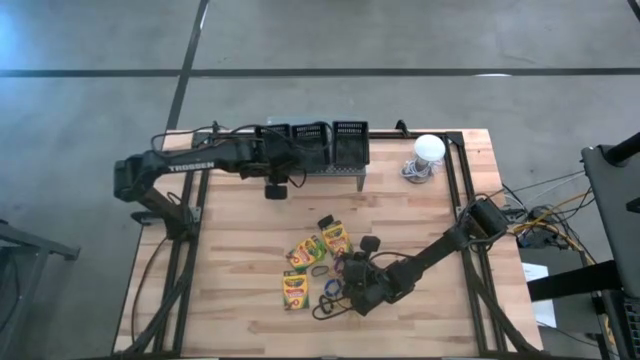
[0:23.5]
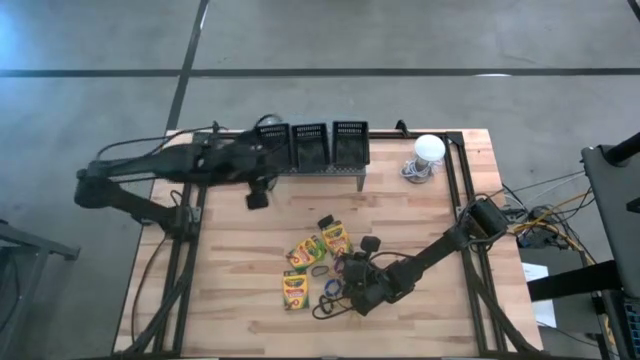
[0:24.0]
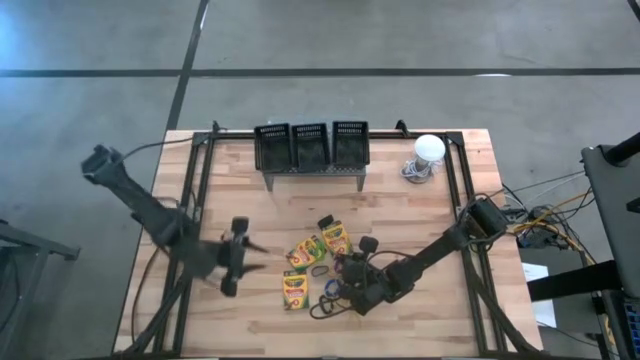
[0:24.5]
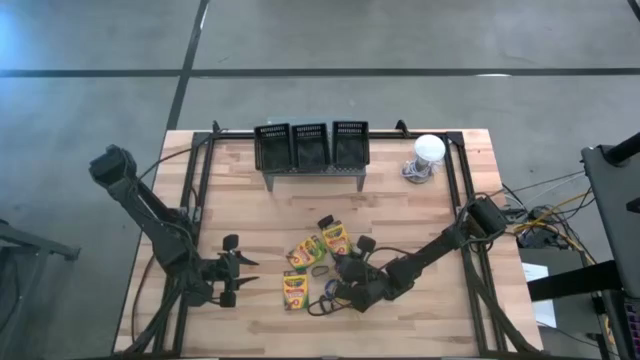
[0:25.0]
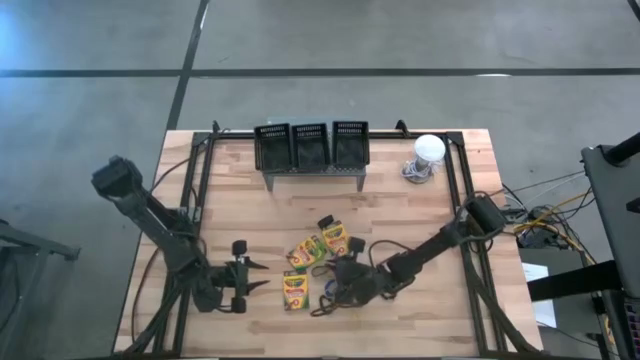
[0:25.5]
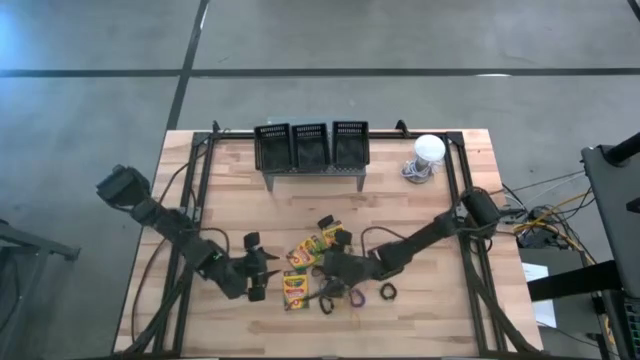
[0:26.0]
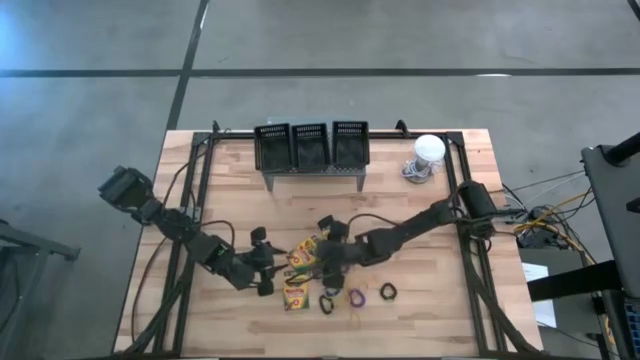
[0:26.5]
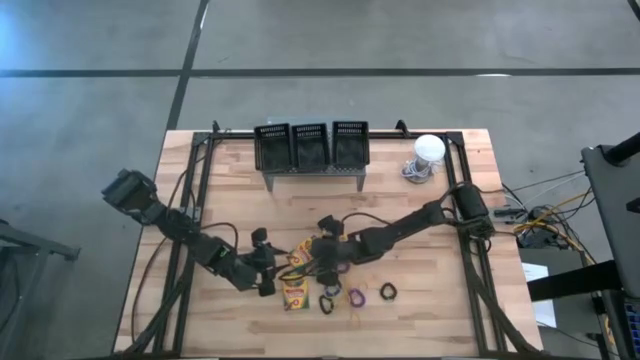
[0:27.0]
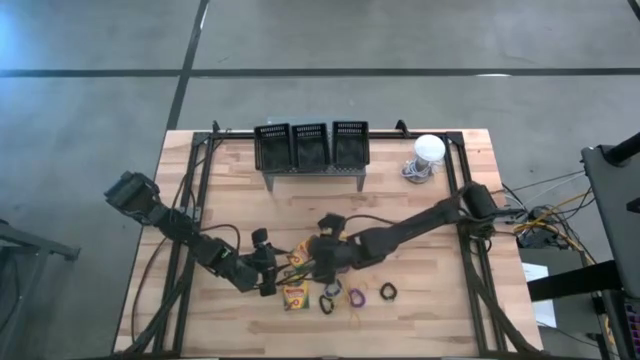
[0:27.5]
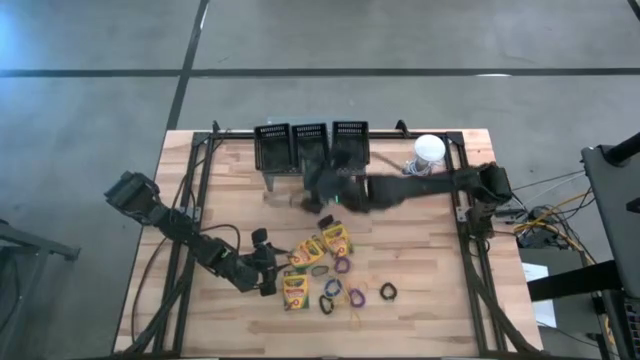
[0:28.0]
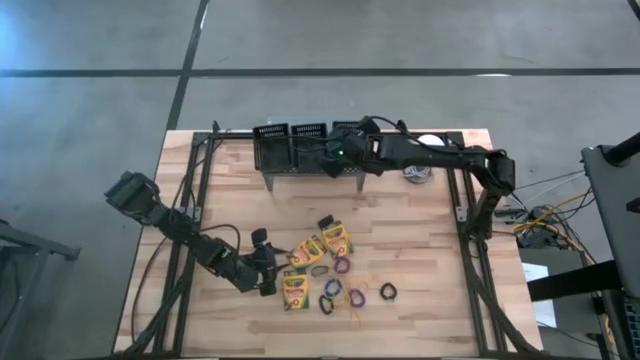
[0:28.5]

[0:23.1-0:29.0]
Task: Pick & Place Office Desk Supplies
Put the green spring key chain into the right black bin

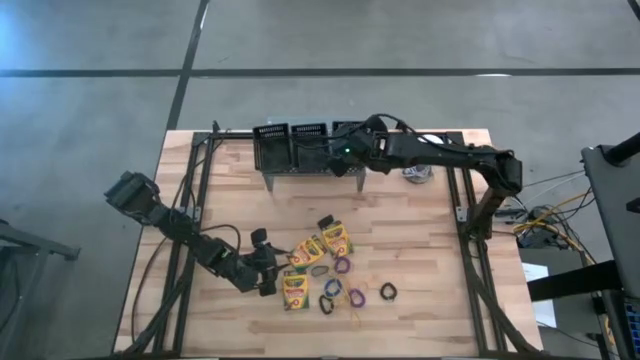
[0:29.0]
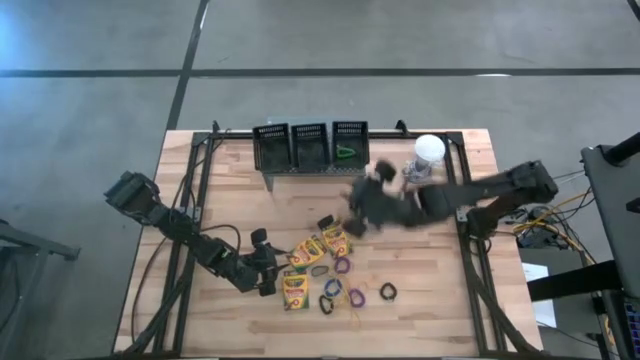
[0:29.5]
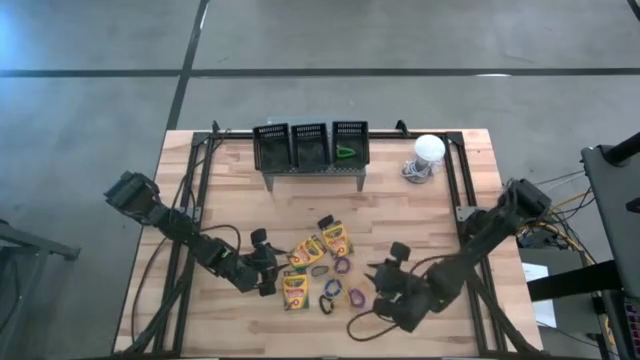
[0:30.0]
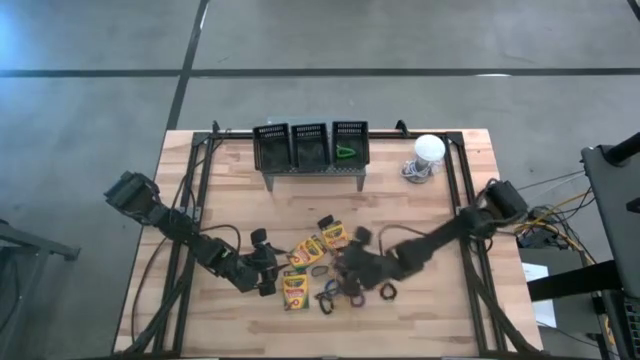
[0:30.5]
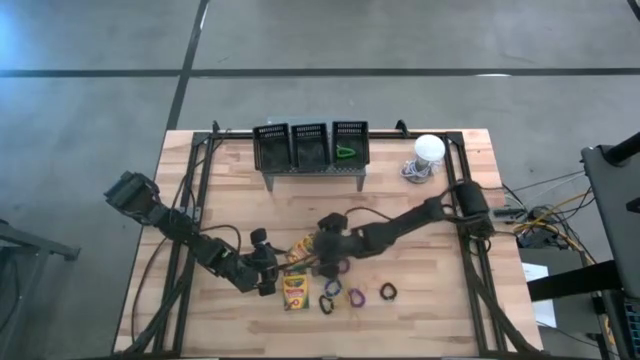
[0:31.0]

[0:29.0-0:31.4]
Put the yellow rubber band into the middle black bin

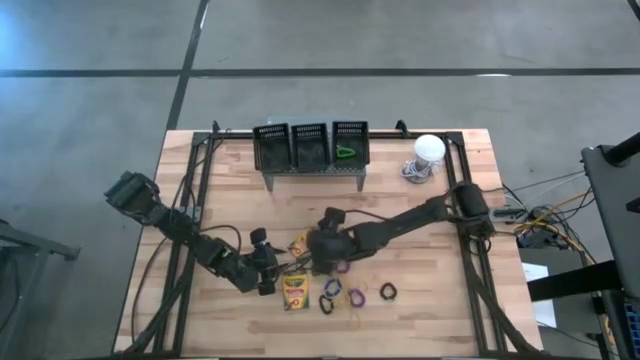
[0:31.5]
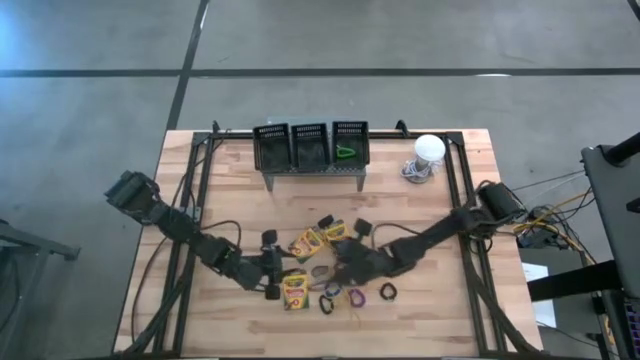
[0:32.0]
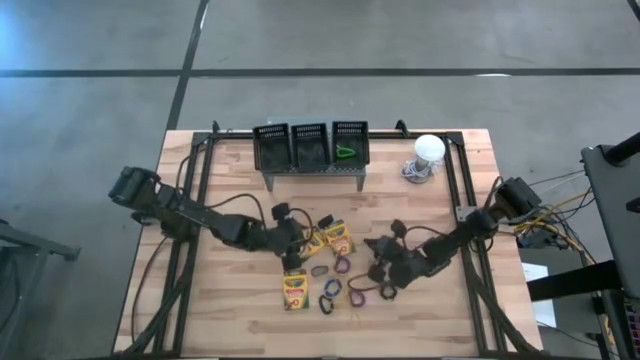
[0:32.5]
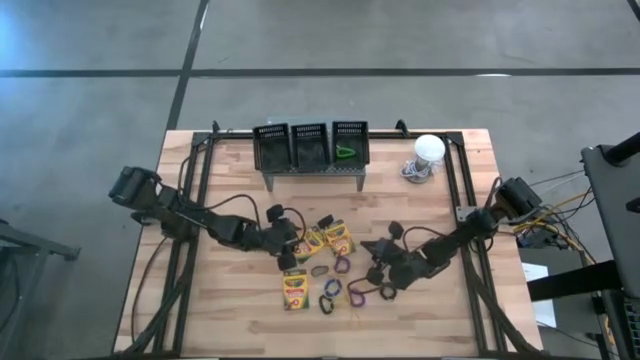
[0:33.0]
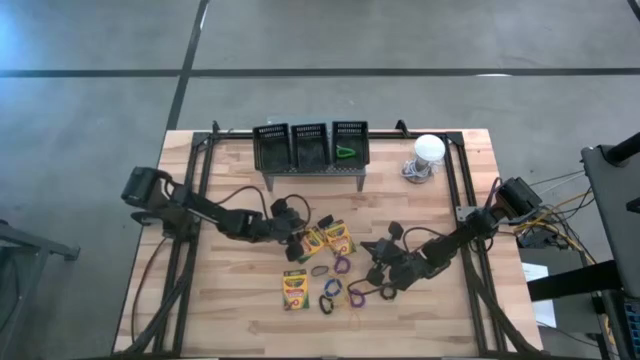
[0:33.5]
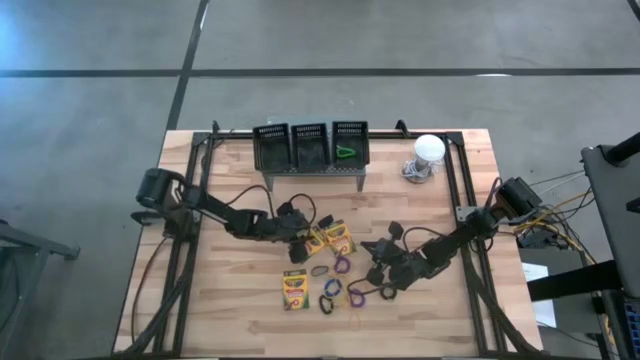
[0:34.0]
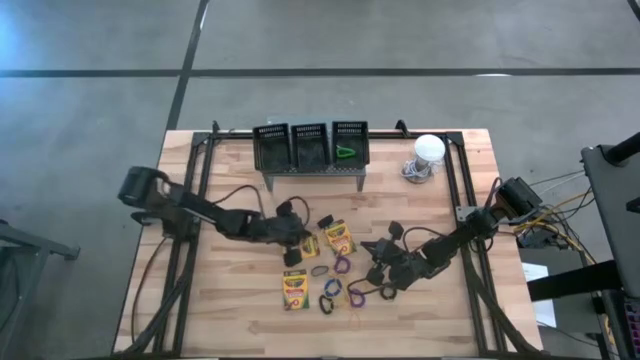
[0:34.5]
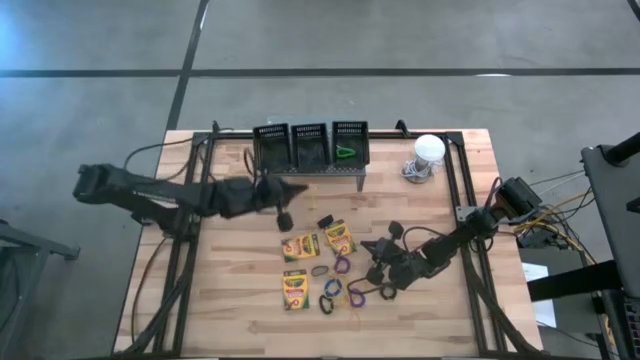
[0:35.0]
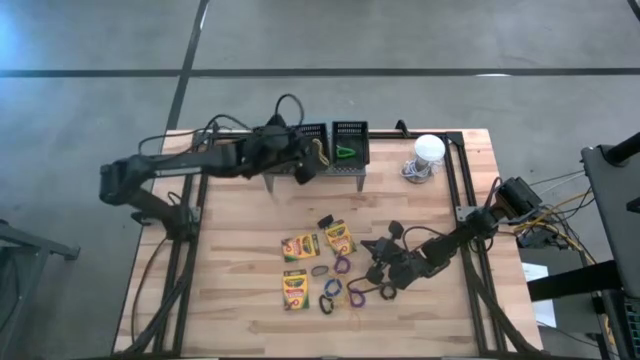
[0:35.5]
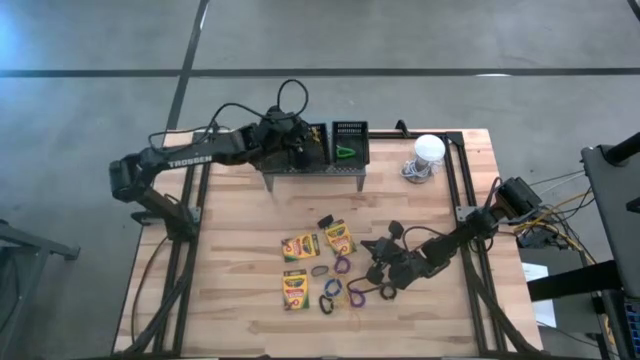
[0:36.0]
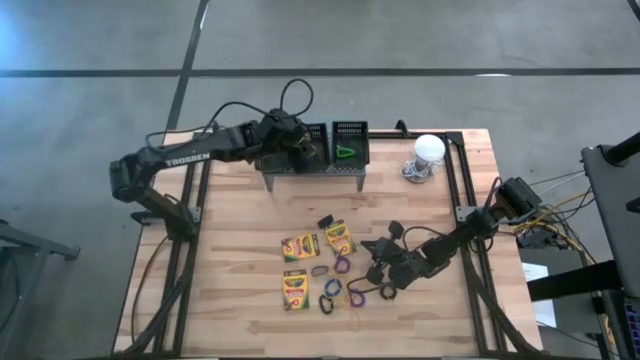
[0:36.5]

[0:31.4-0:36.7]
Put the yellow rubber band into the middle black bin

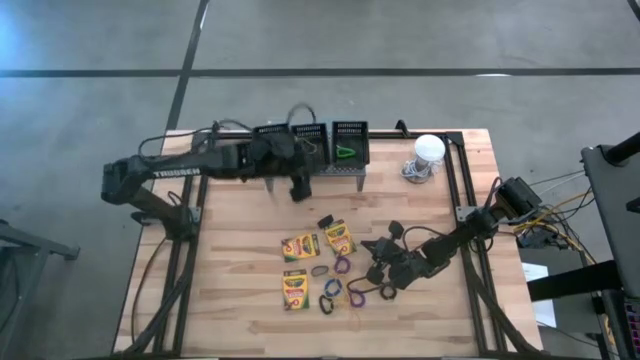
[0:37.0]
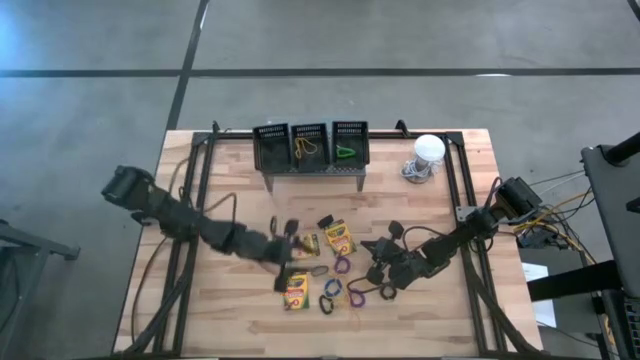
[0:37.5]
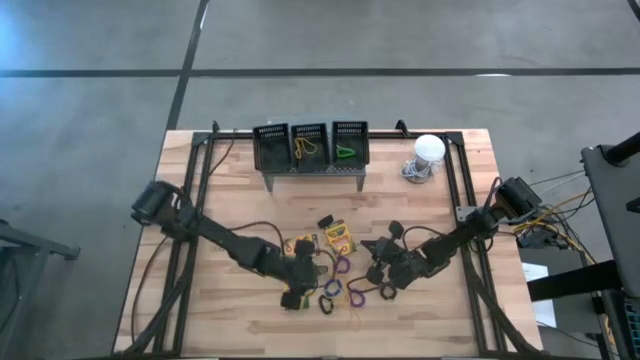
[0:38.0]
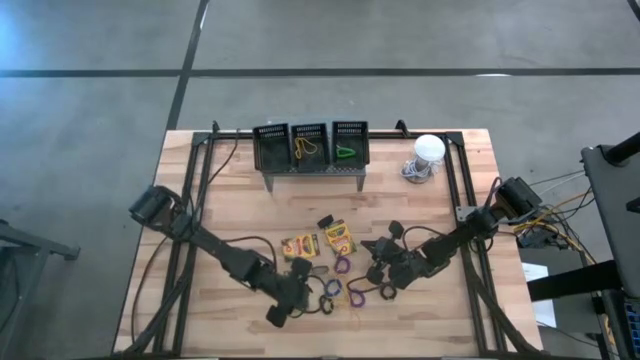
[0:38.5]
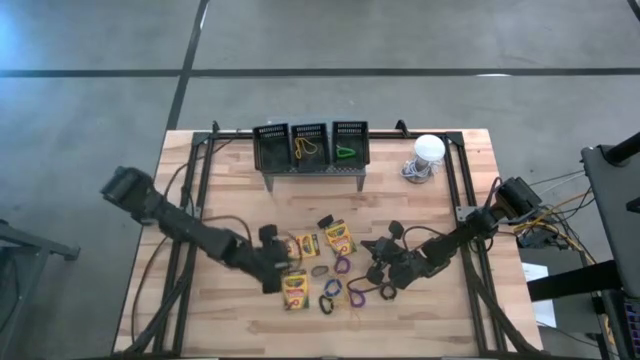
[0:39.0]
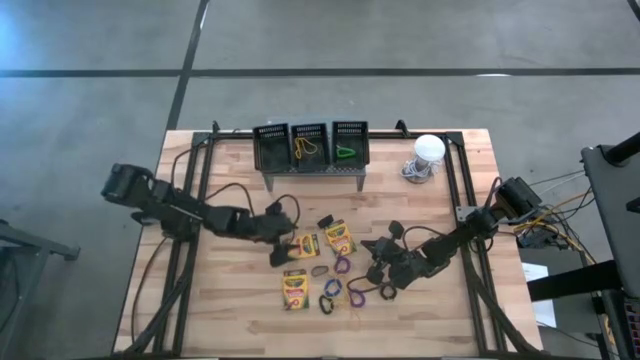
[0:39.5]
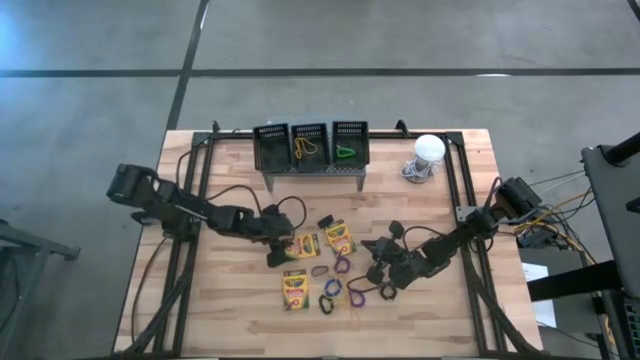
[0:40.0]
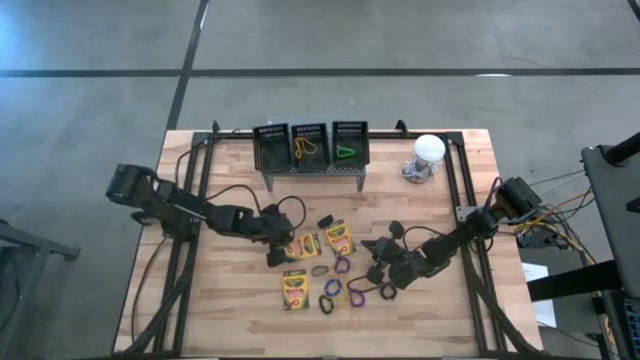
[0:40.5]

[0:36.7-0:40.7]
Put the top left crayon box into the left black bin

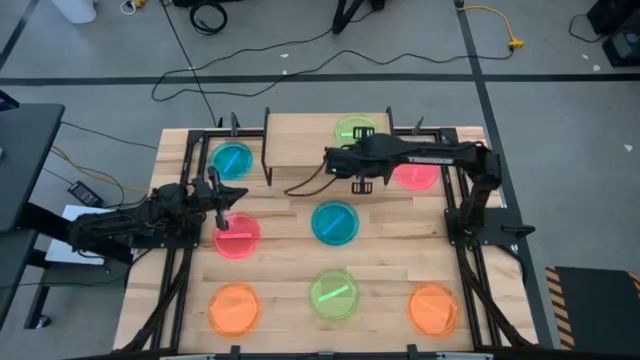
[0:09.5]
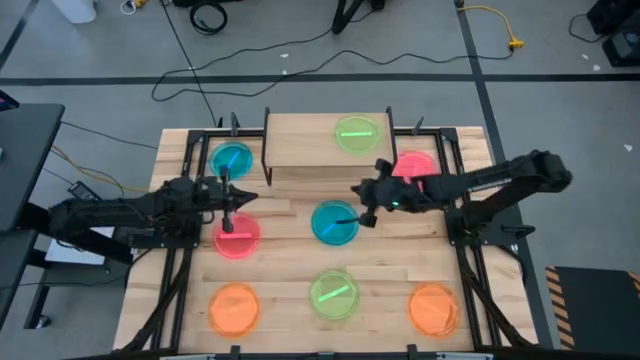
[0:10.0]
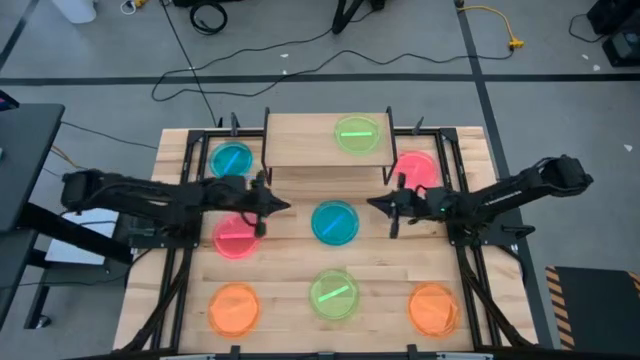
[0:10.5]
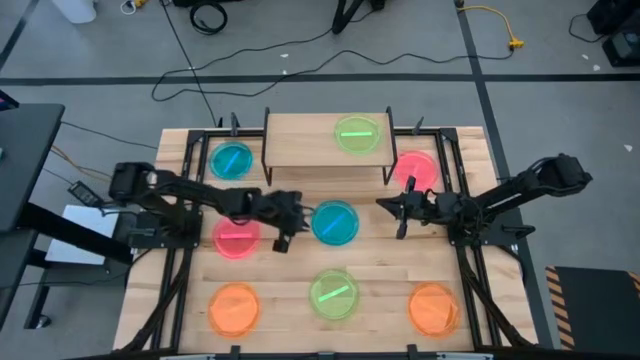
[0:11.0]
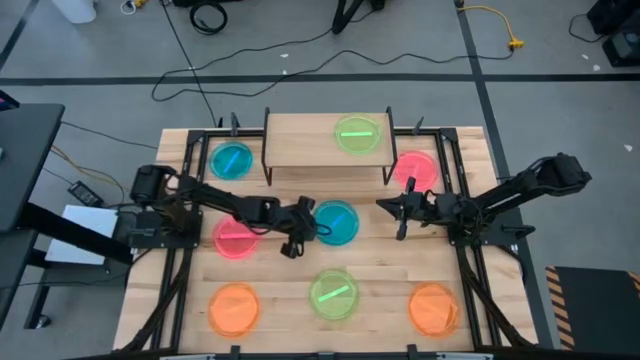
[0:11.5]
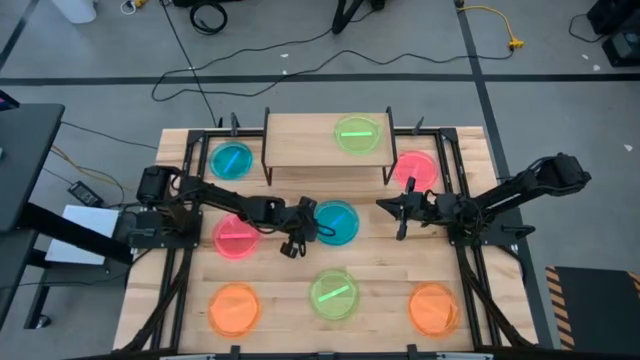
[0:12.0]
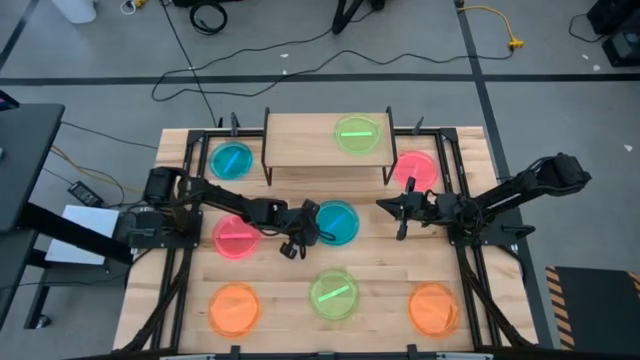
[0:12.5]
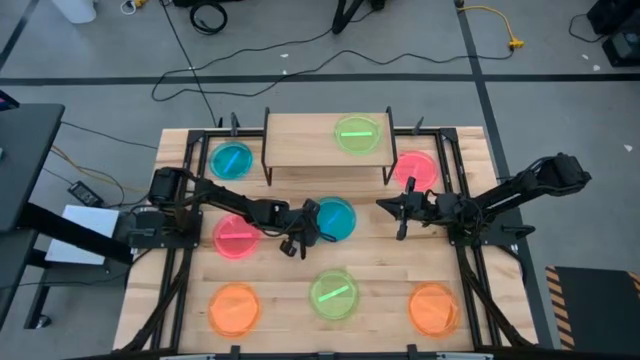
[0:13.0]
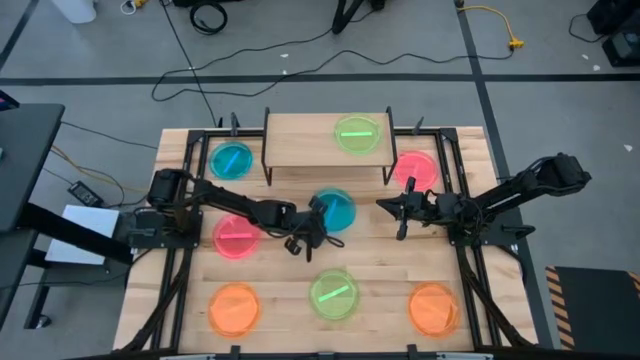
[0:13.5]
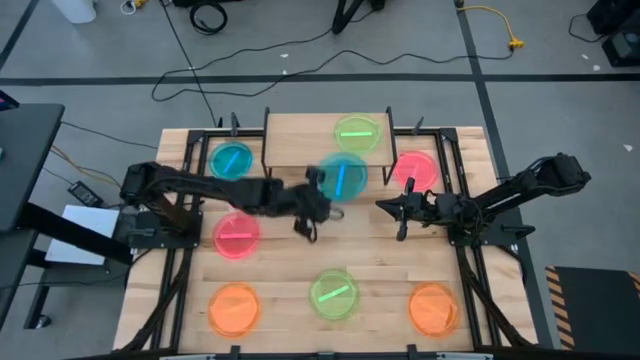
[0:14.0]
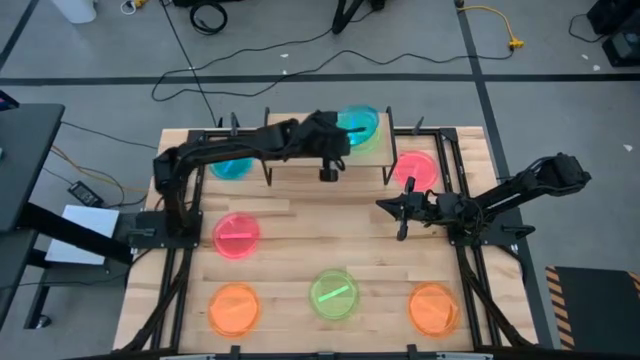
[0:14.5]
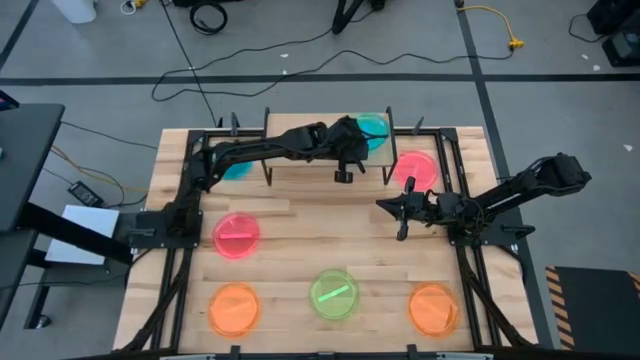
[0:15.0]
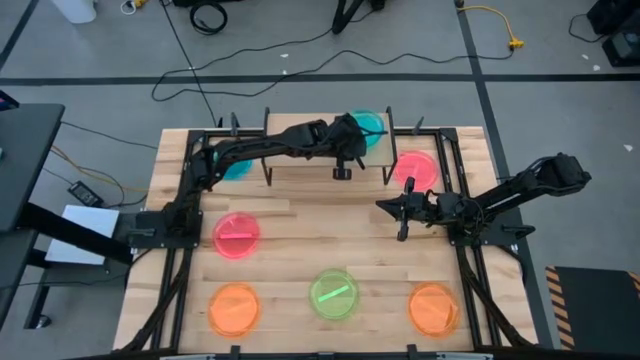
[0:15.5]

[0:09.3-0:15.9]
Task: Place and stack plates onto a shelf
Stack the bottom blue plate on top of the green plate on the shelf
